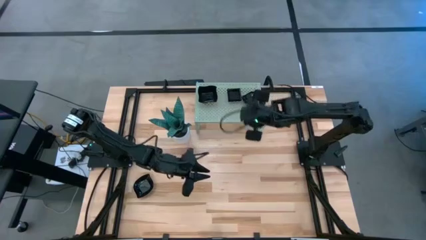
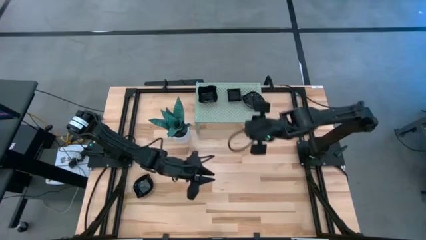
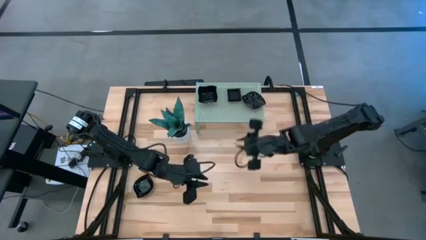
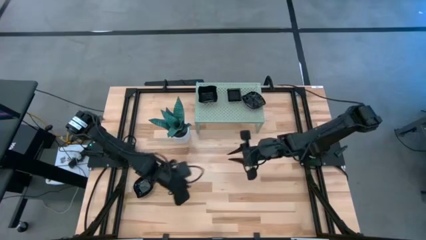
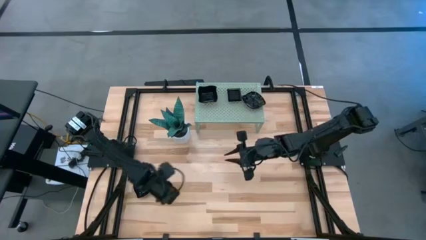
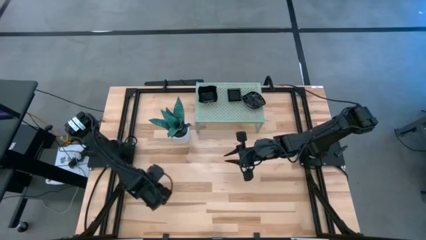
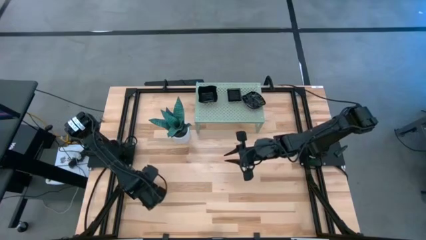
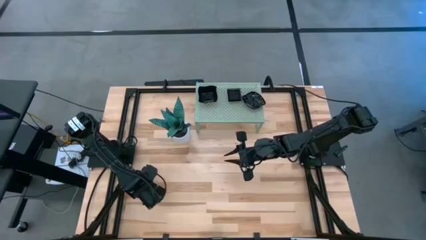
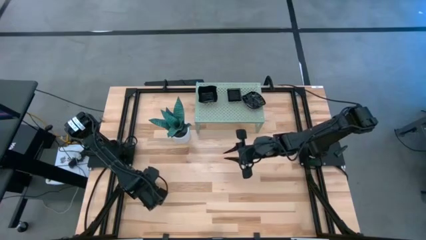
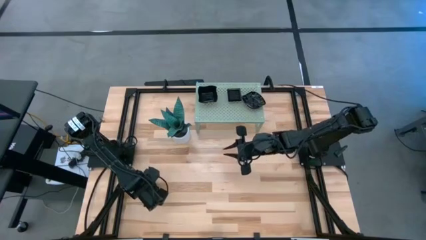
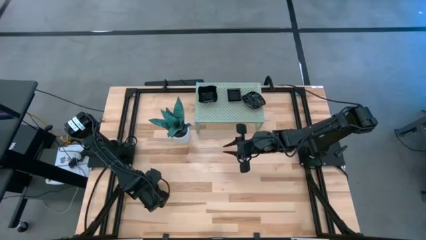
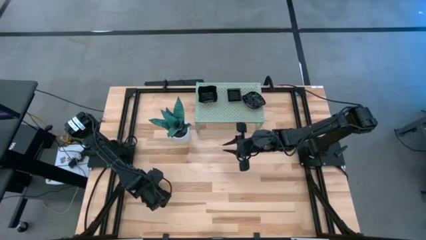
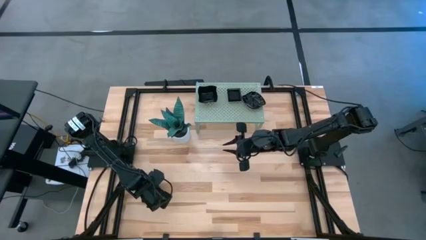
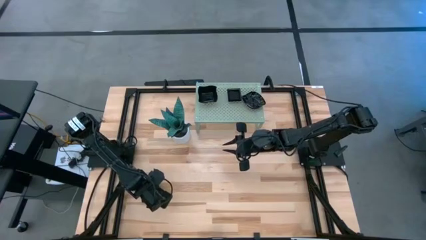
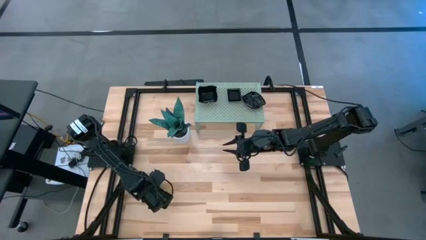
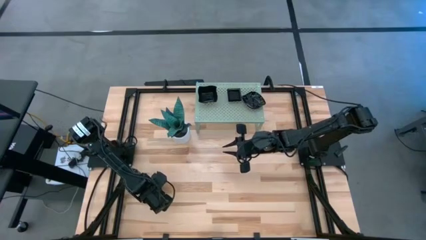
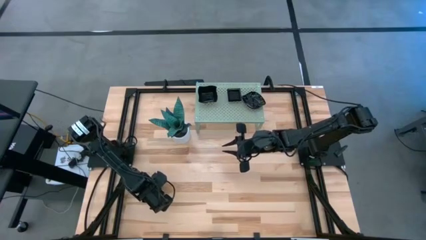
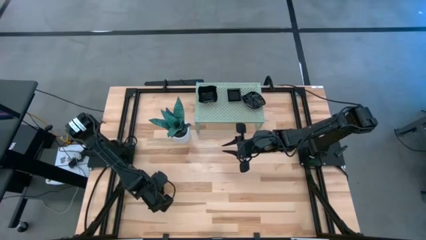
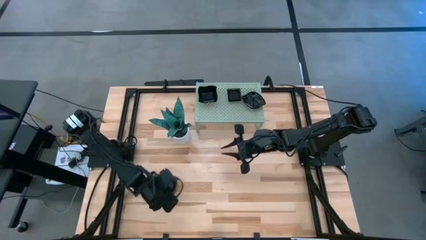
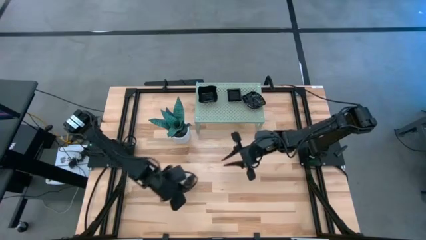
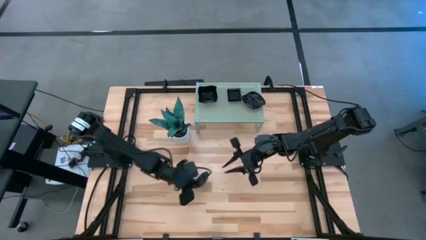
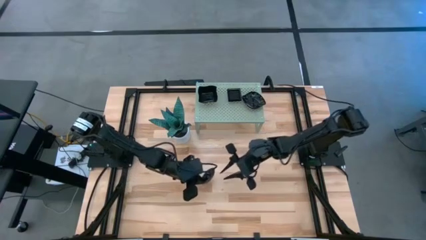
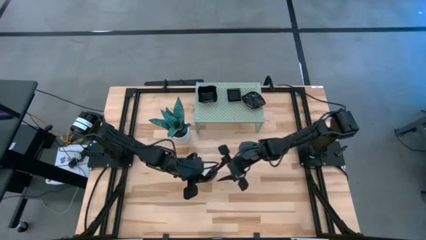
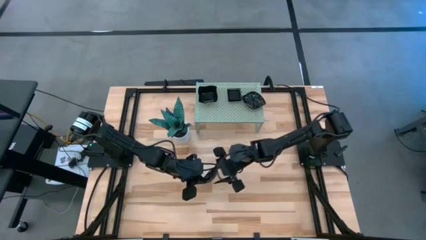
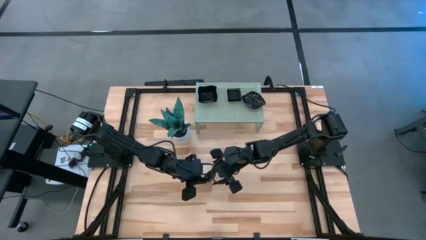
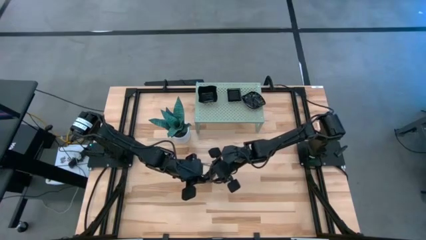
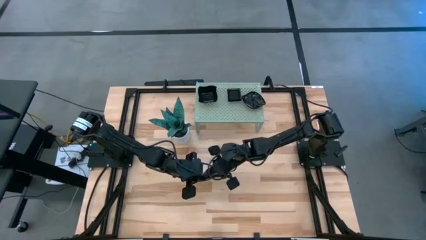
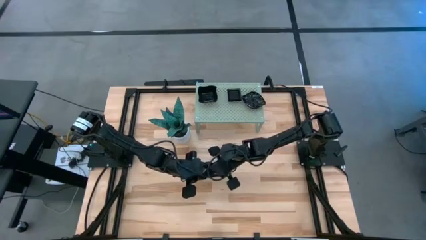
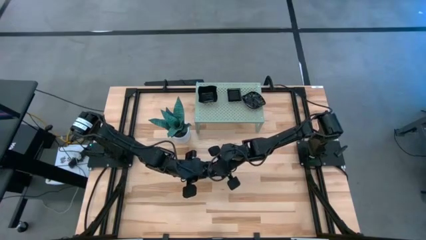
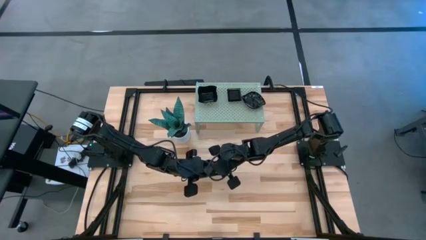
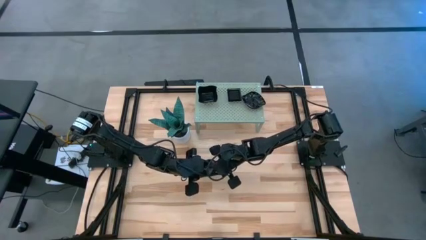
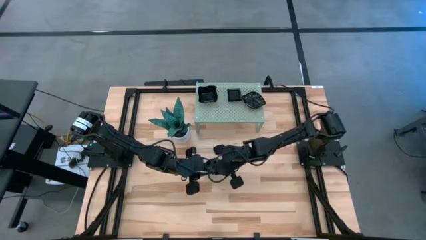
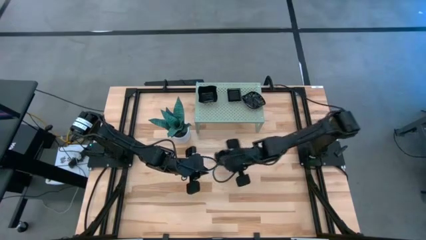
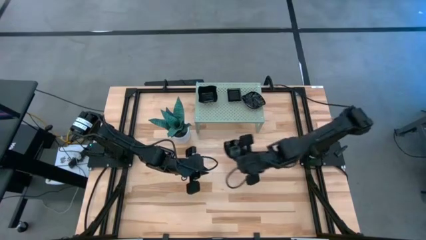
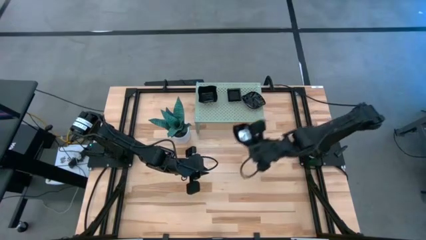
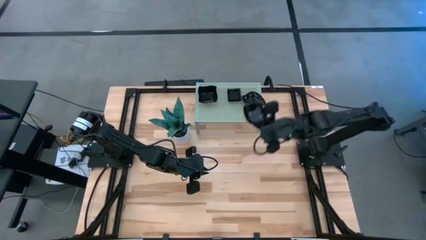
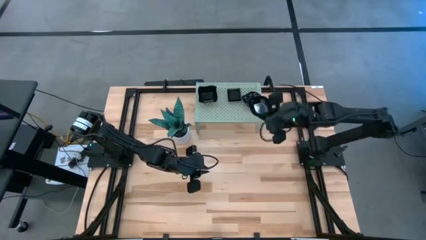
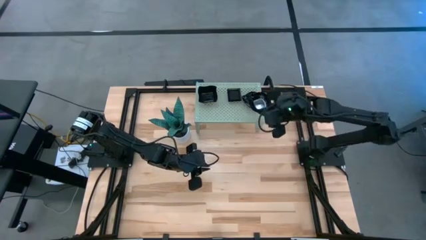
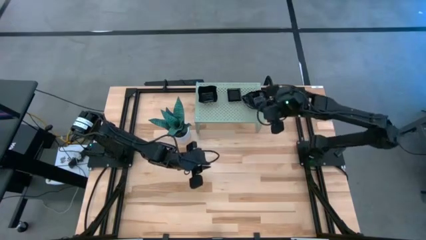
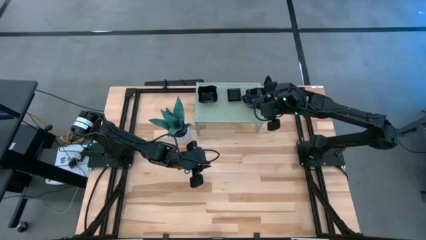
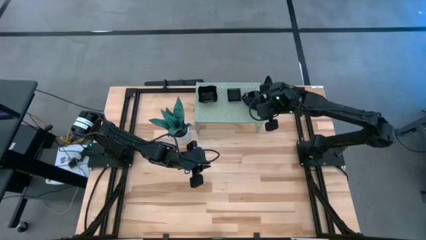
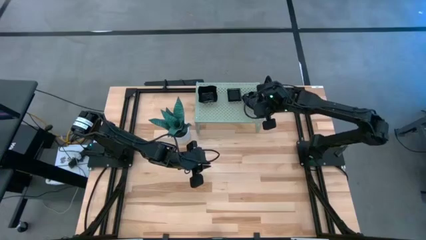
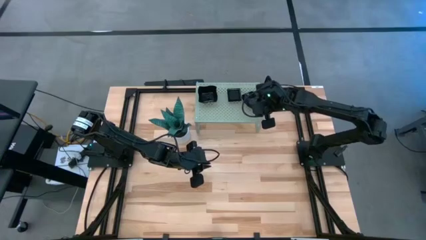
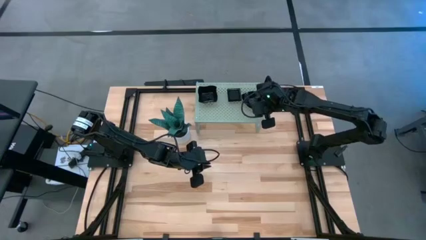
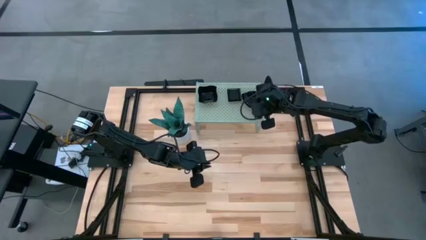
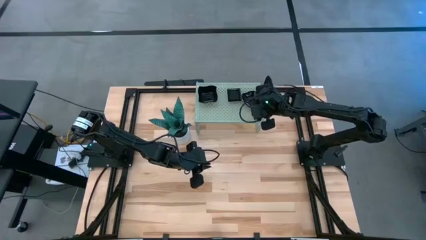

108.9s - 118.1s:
Task: Pick & Place Mini shaped plates
Stack the leaf-shaped plate on top of the other leaf-shaped plate on the shelf

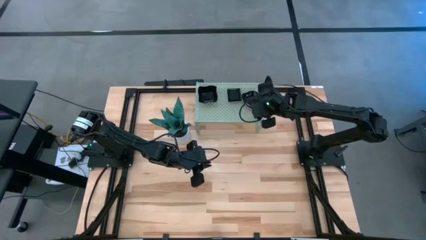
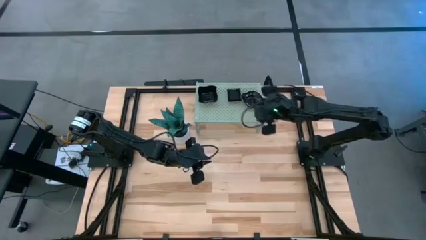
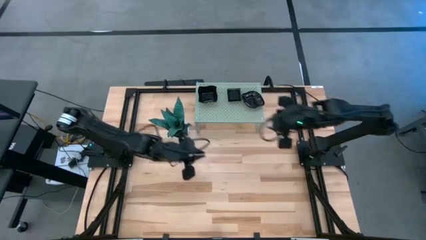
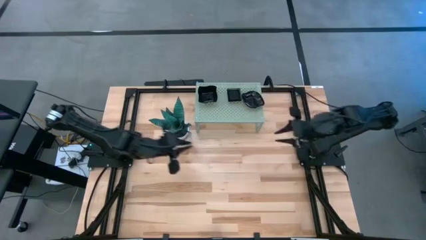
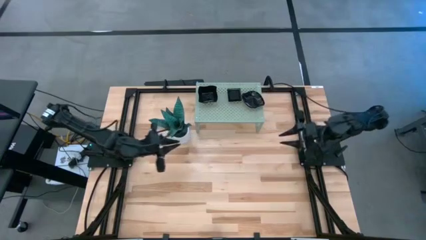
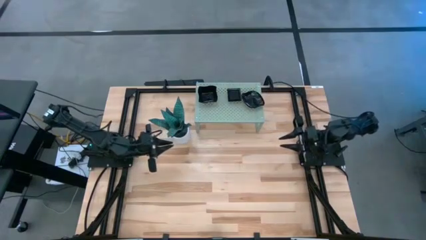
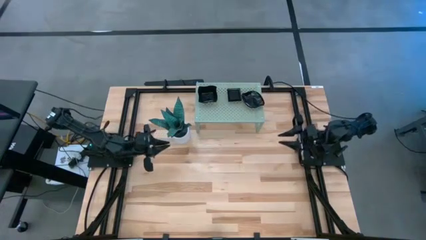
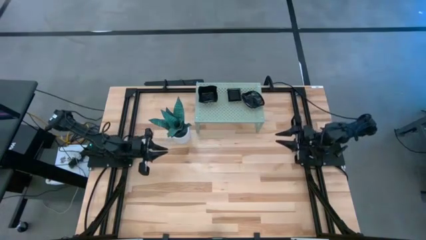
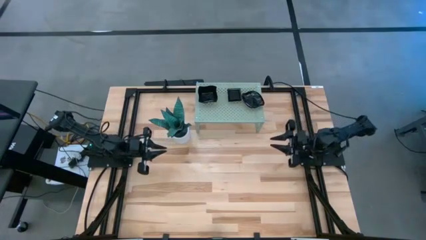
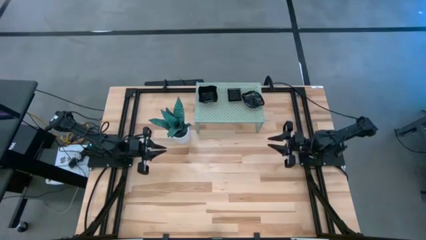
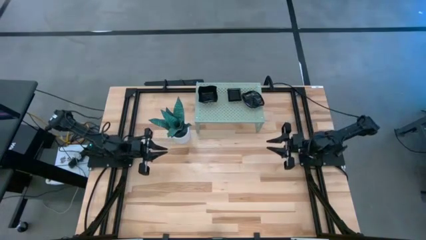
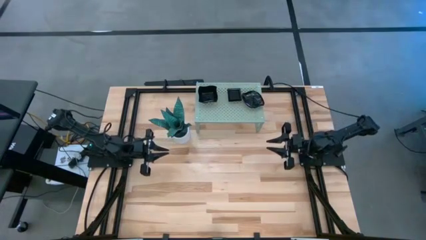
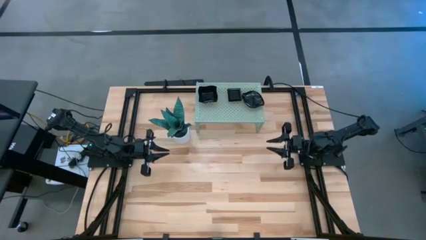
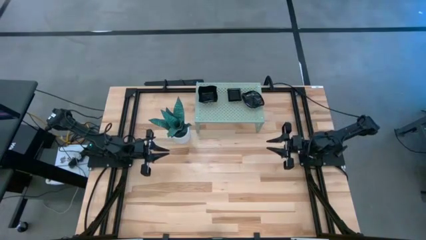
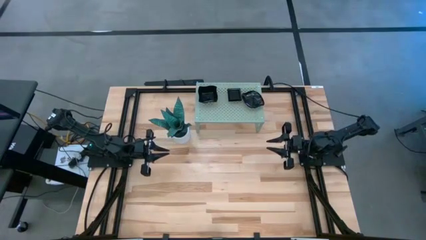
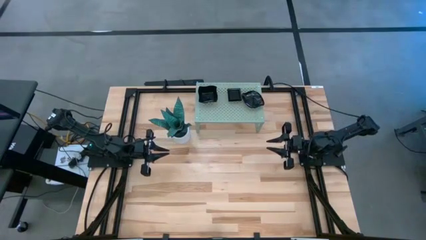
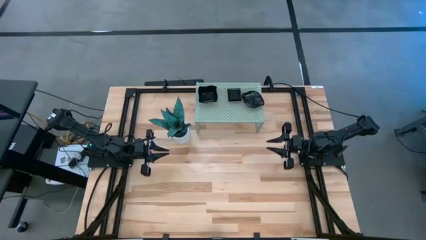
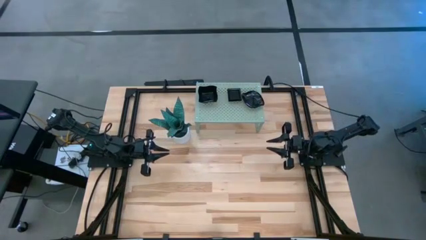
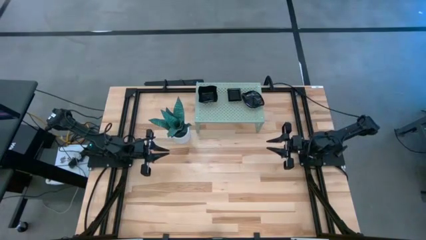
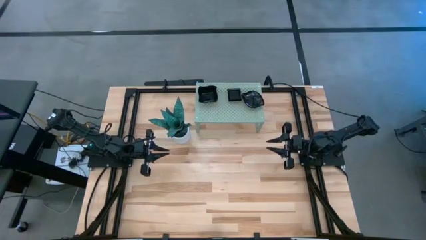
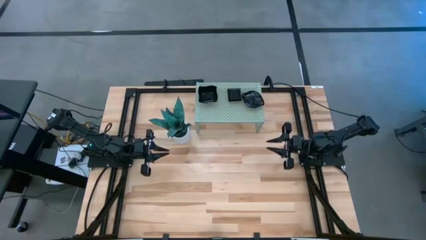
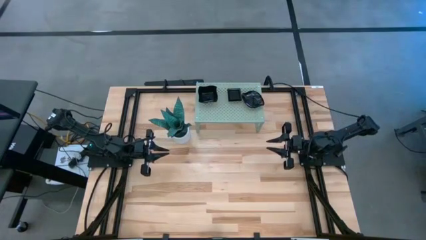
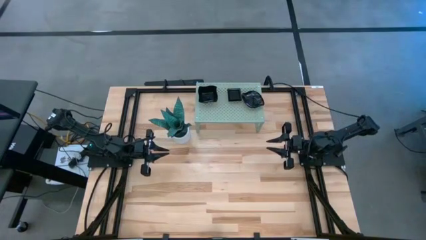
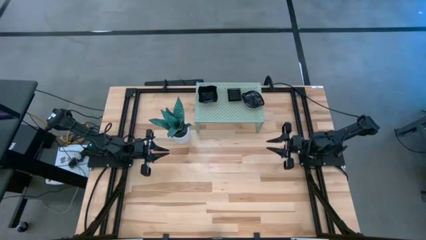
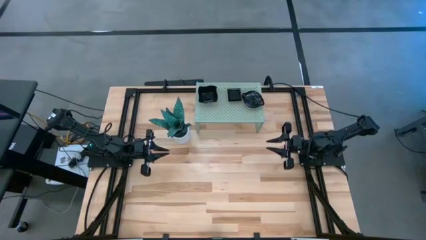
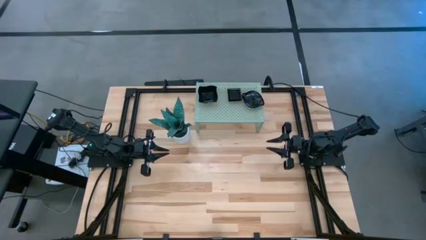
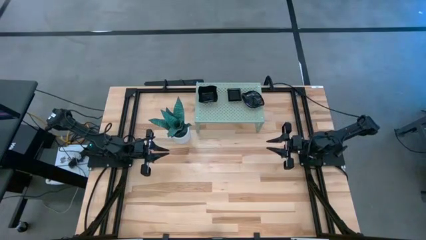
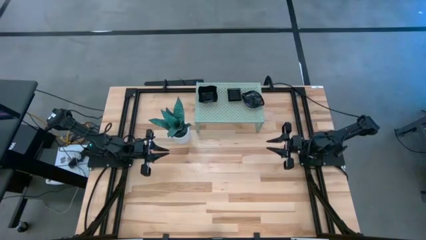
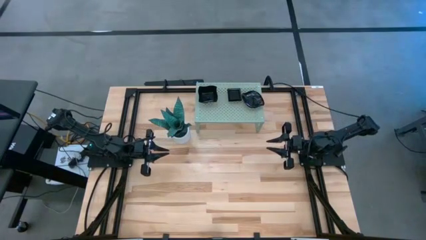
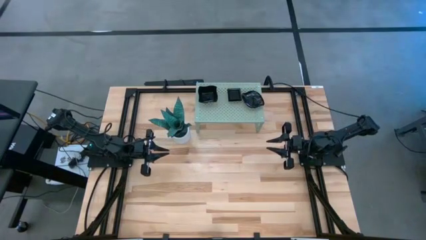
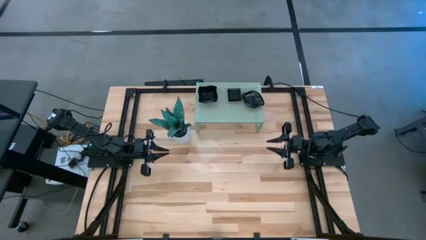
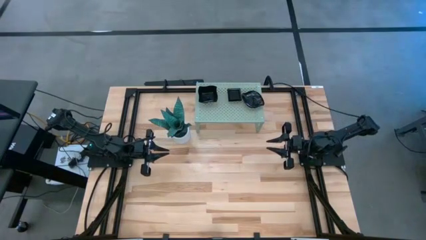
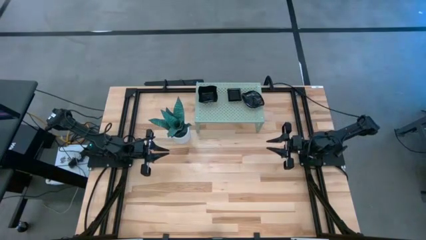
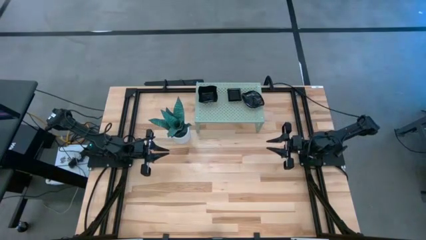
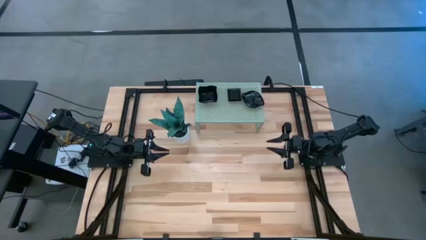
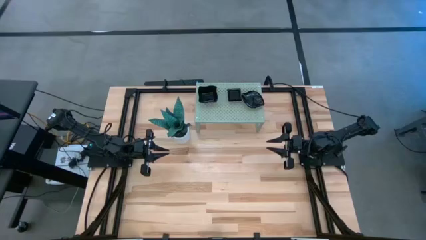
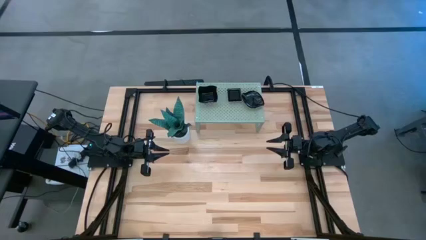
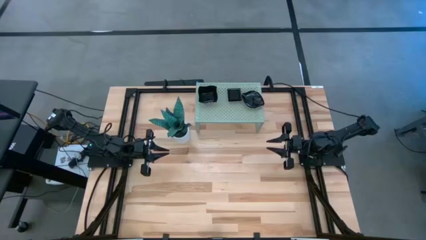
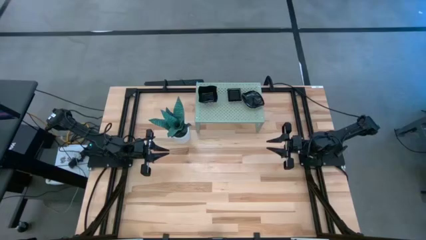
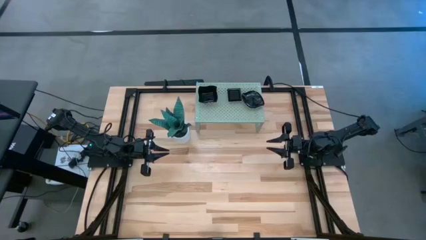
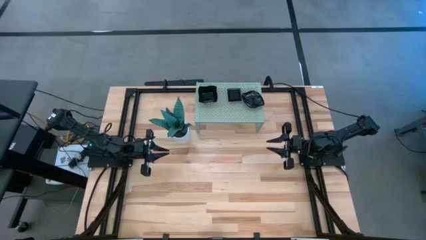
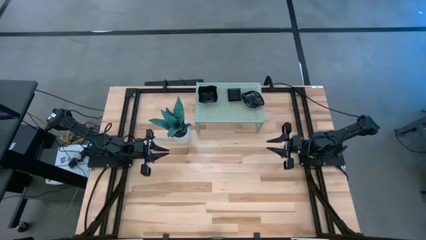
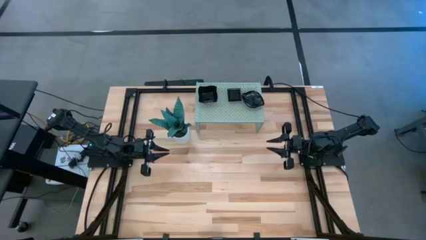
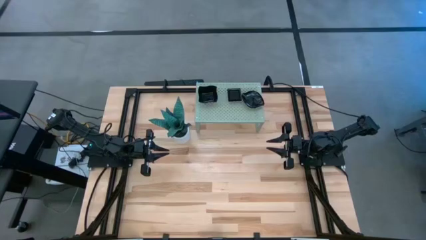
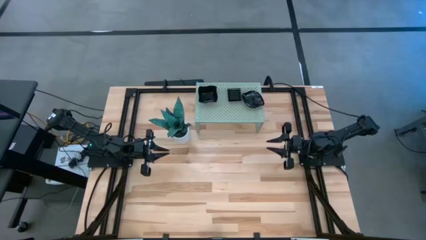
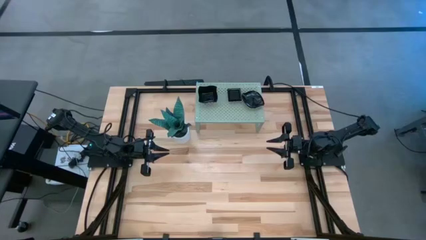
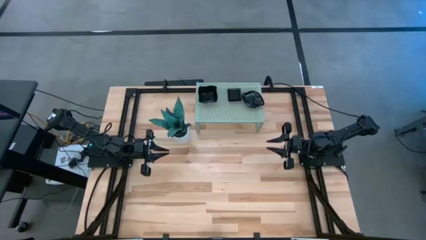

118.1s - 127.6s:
Return to Home Position
